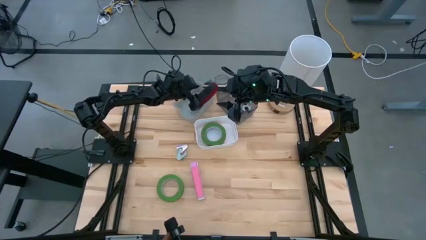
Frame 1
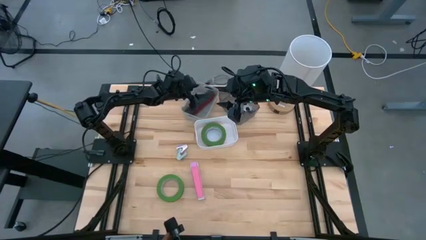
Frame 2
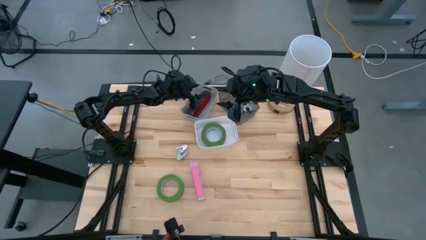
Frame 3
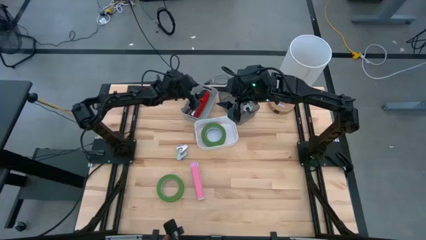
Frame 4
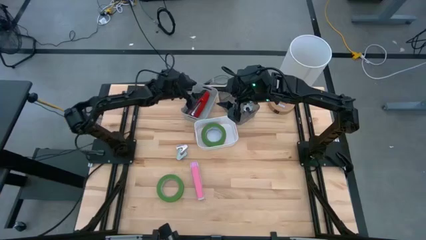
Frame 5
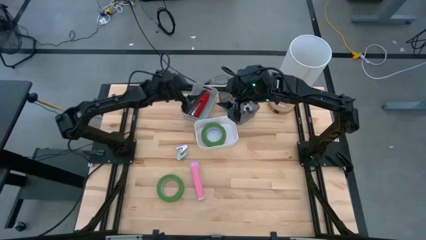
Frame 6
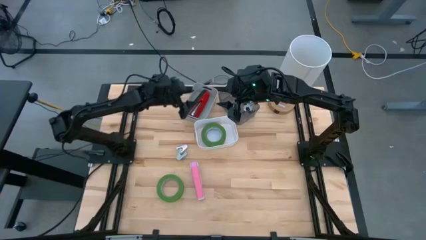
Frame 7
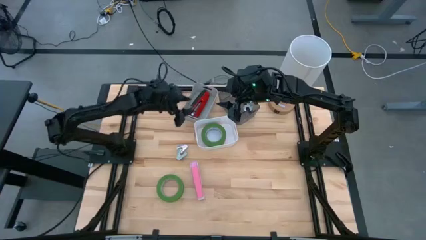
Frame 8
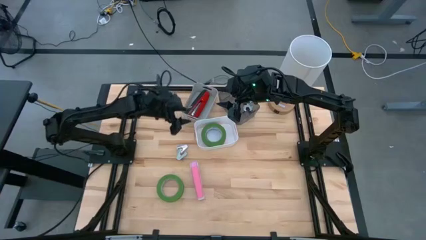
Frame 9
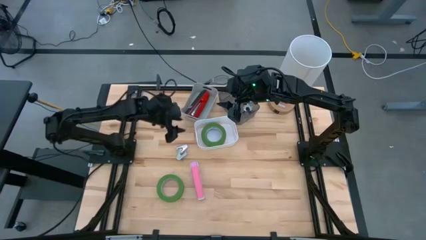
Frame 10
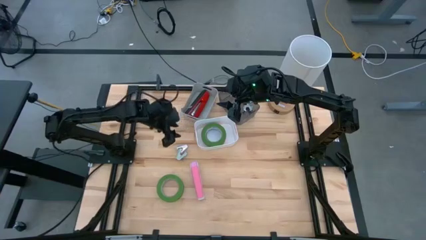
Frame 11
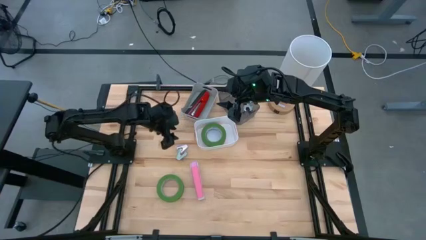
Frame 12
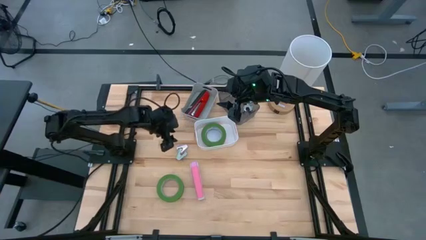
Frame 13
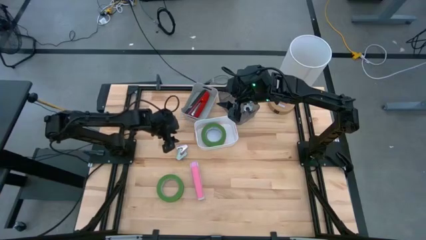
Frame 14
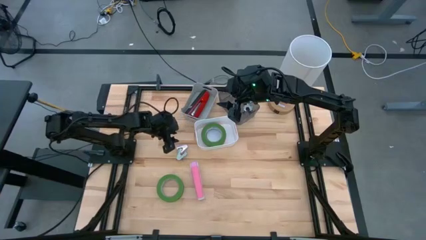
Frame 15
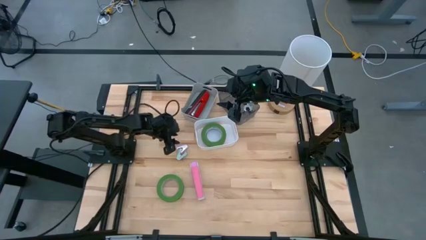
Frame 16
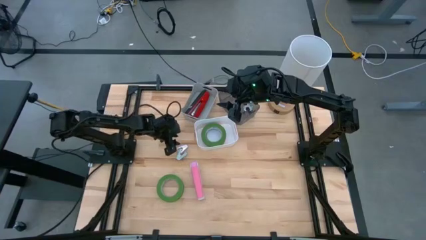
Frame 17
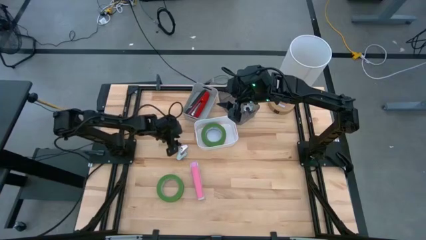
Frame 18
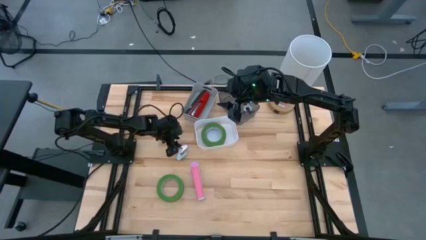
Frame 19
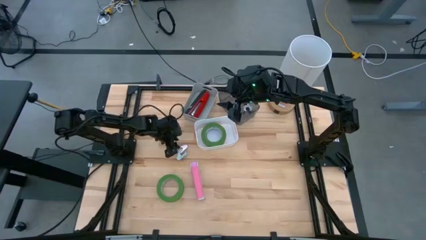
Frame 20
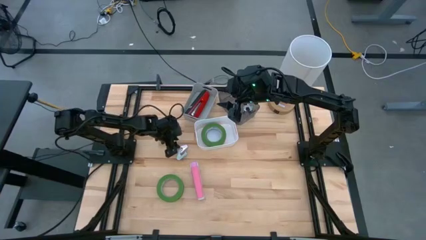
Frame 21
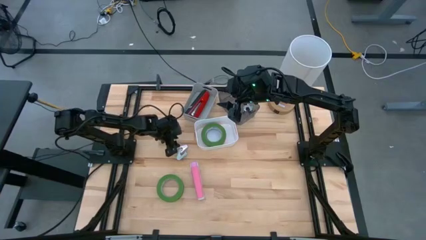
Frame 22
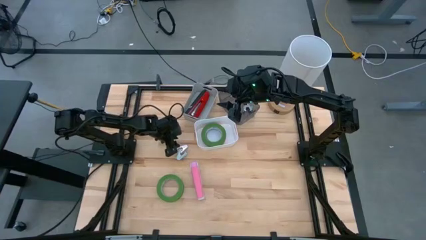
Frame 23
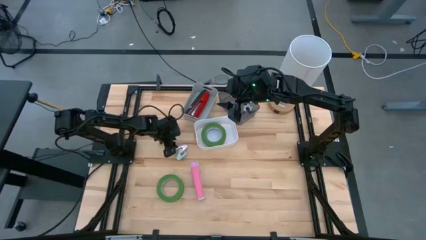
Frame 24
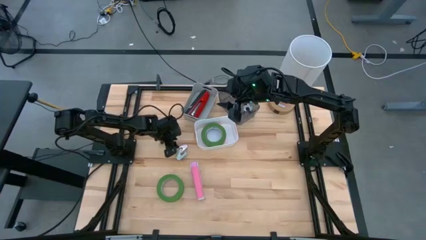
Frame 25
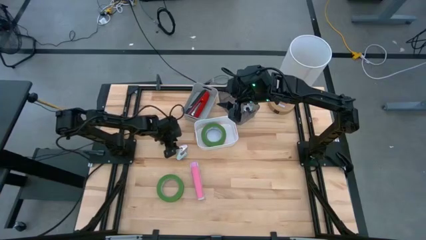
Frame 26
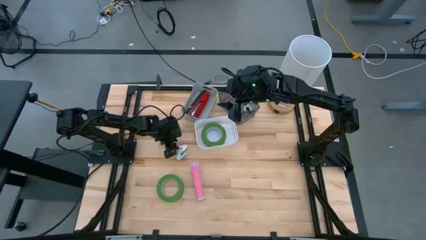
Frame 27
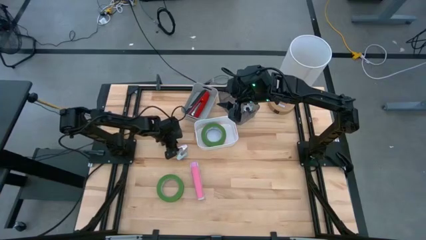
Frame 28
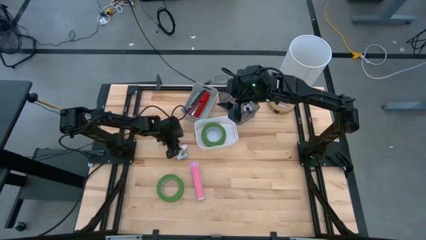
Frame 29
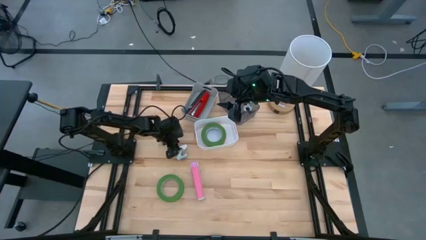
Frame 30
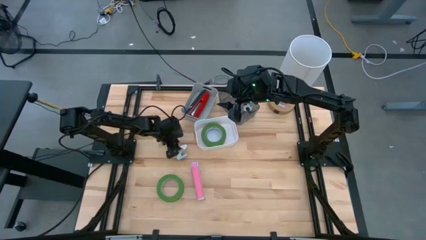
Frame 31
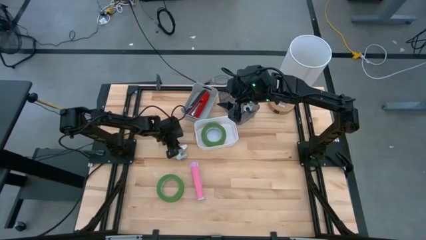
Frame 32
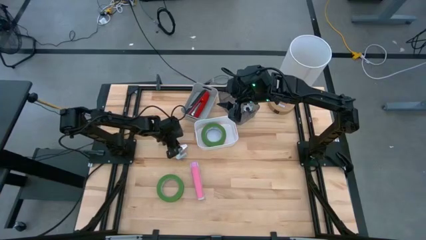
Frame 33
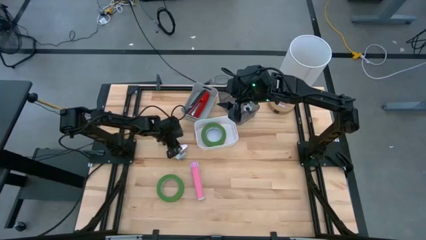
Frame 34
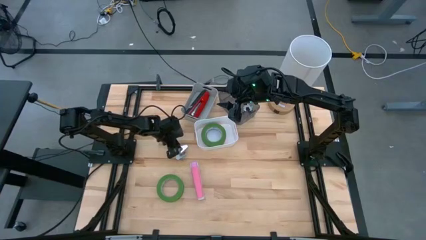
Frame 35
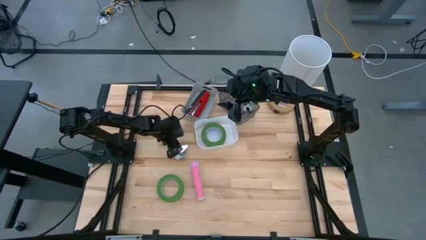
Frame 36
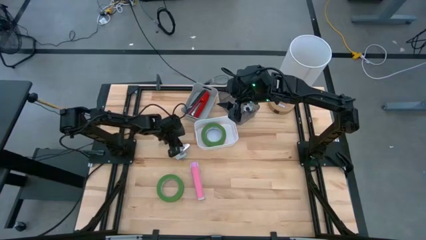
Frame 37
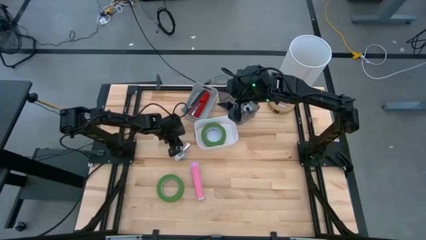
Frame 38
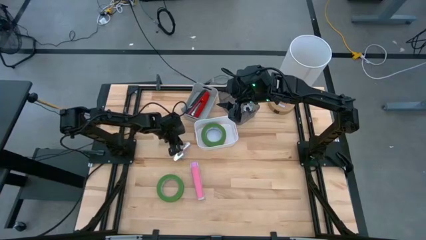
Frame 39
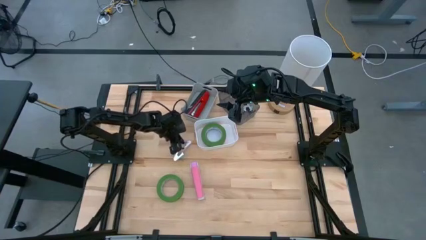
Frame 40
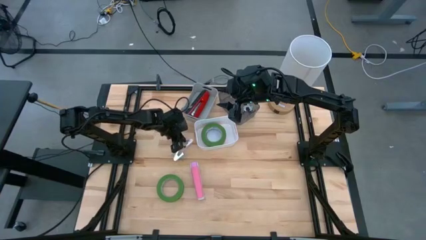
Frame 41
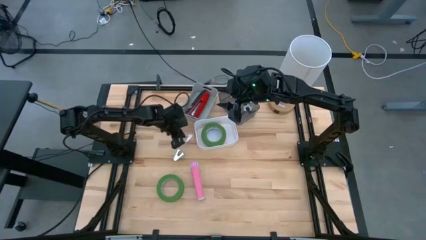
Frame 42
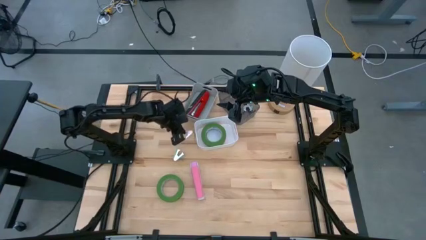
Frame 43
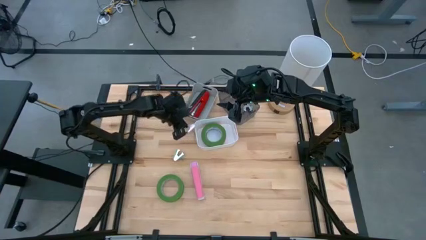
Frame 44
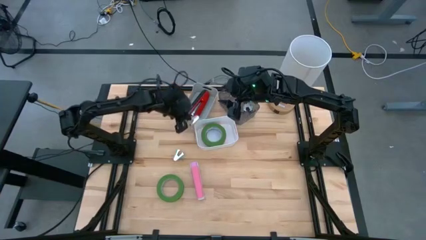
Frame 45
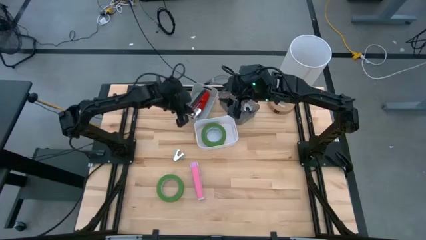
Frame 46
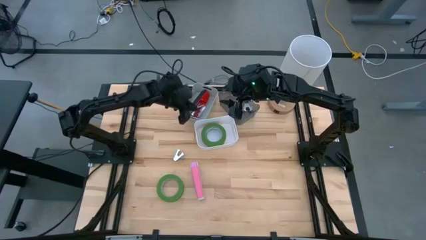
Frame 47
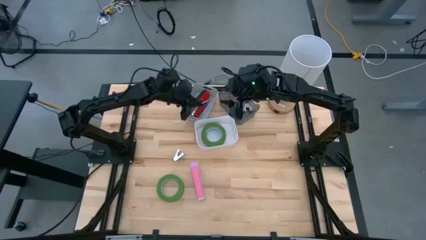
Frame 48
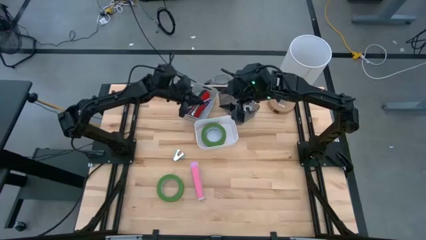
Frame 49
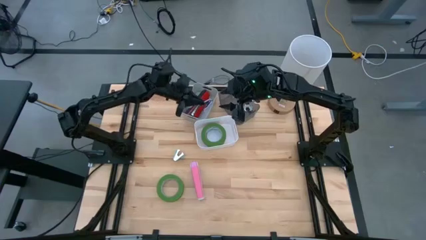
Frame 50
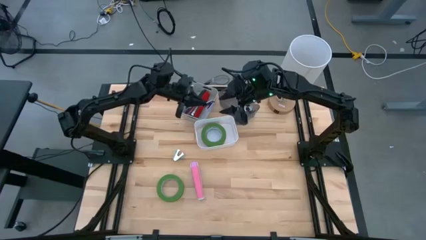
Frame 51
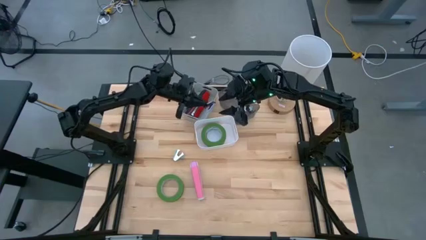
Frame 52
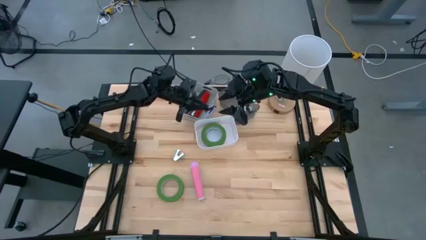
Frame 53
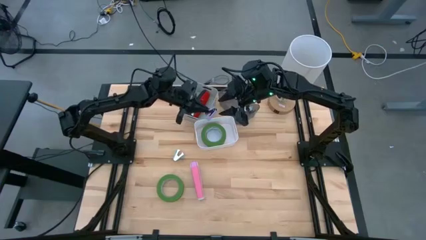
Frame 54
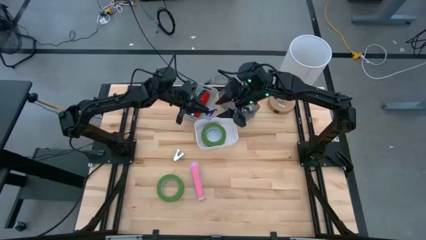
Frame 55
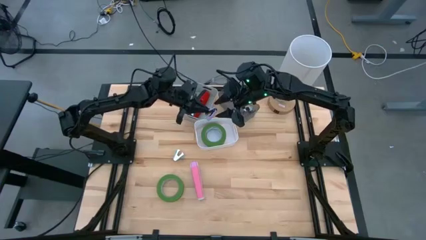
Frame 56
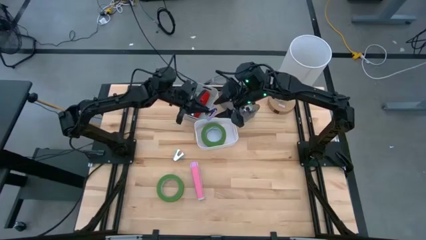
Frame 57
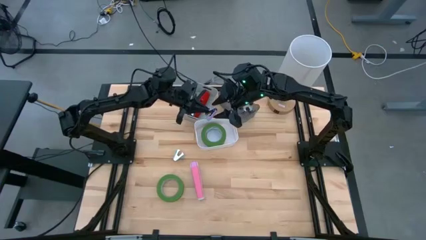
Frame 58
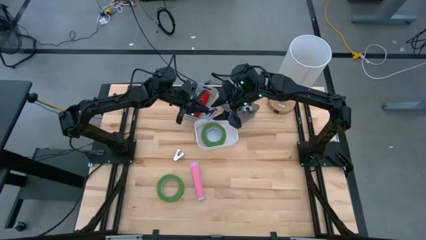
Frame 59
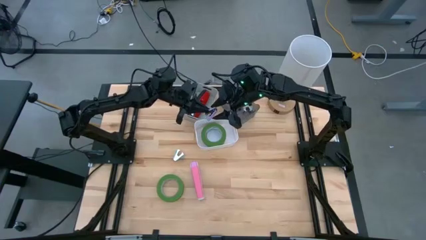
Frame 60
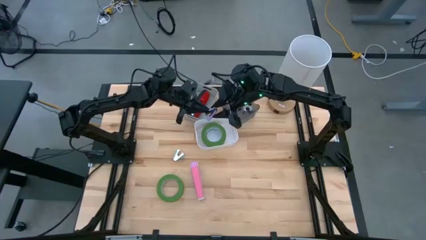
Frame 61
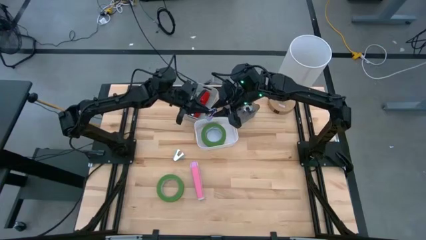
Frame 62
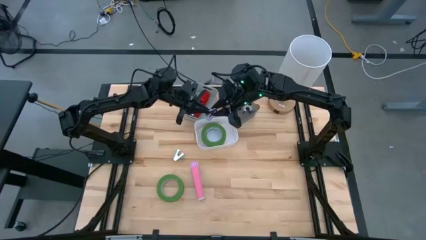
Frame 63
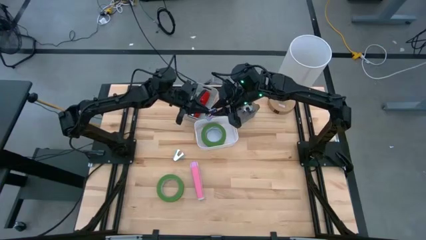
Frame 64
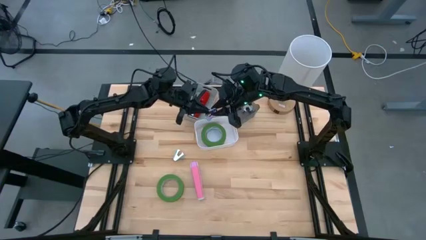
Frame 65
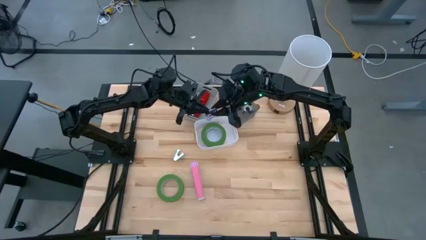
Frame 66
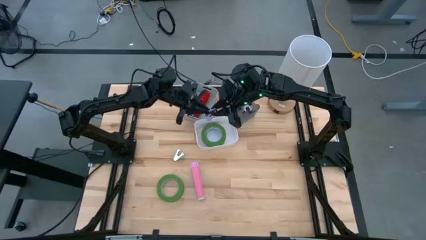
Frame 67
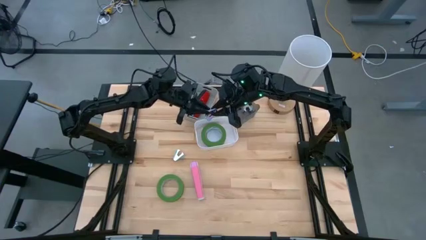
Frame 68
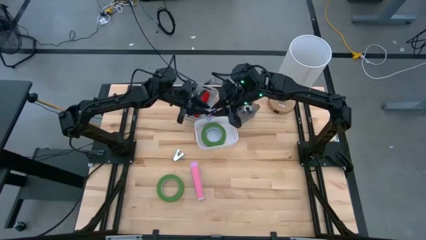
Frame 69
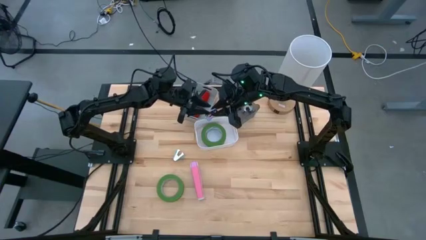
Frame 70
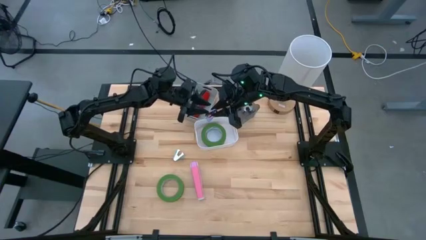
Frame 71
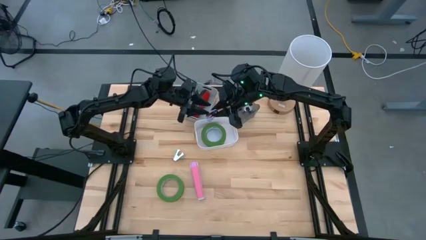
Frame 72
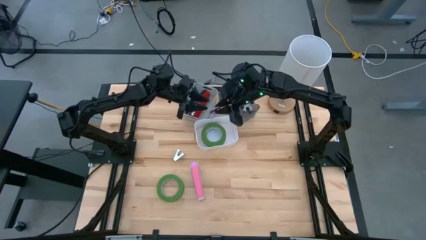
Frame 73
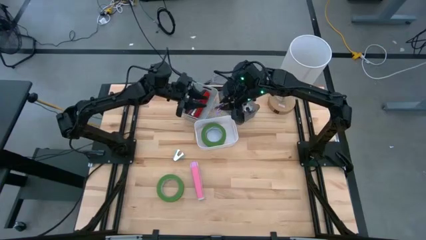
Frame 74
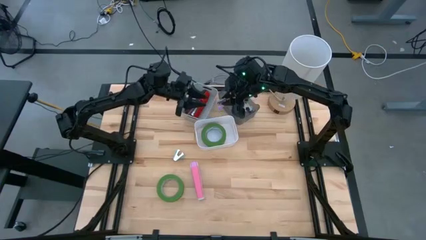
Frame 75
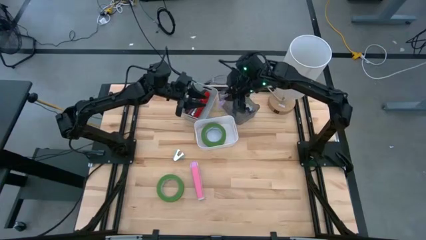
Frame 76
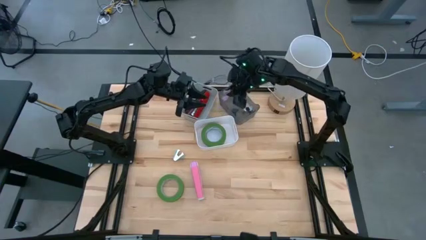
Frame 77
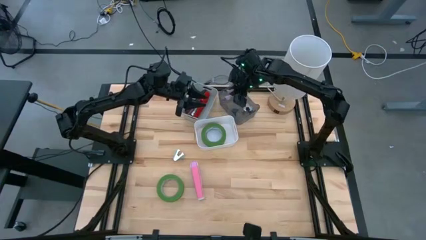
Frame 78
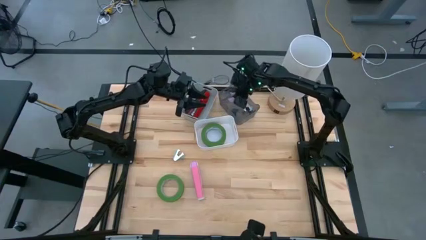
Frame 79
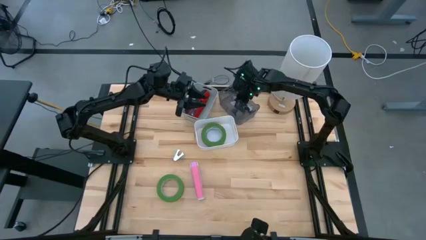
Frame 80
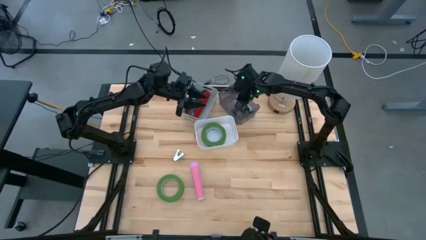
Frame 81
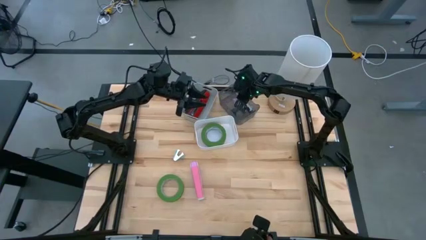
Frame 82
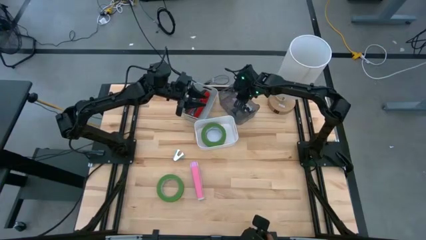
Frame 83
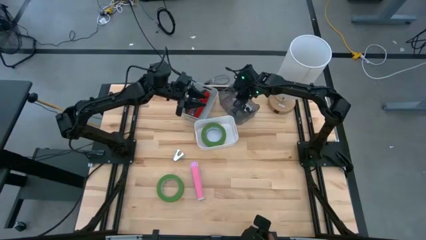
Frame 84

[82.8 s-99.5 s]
Task: Pick and place Stapler, Stapler remover, tape
Put the purple staple remover into the black bin
